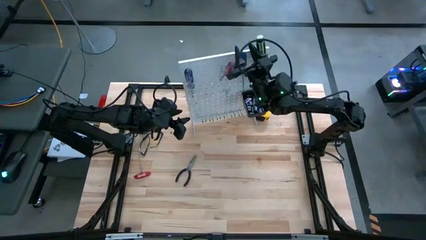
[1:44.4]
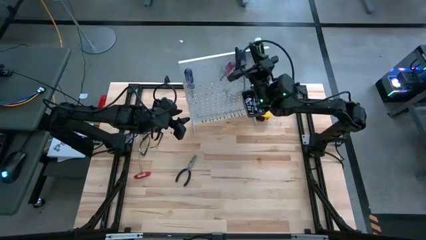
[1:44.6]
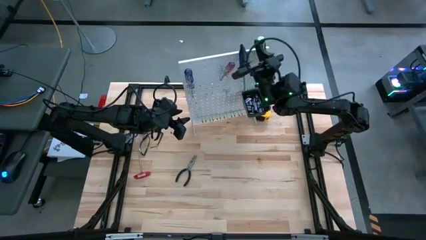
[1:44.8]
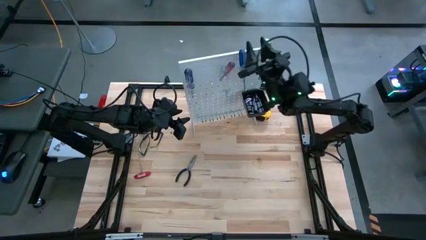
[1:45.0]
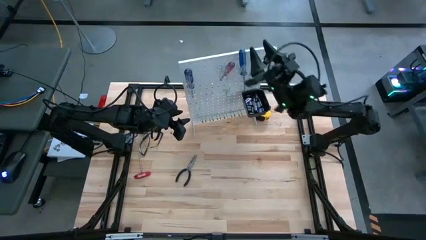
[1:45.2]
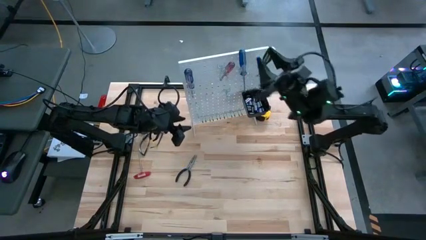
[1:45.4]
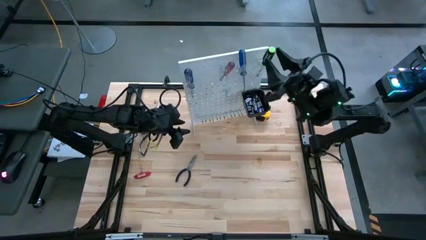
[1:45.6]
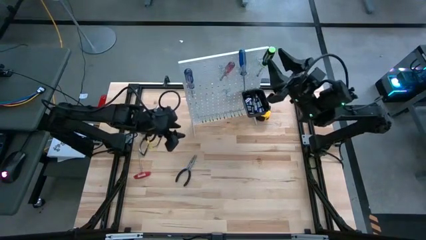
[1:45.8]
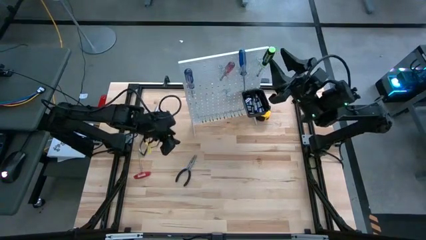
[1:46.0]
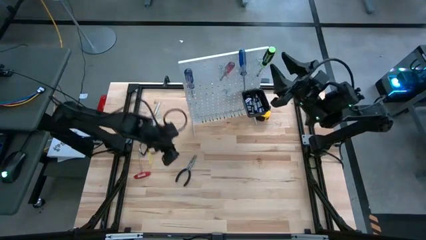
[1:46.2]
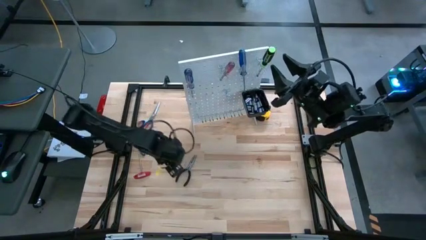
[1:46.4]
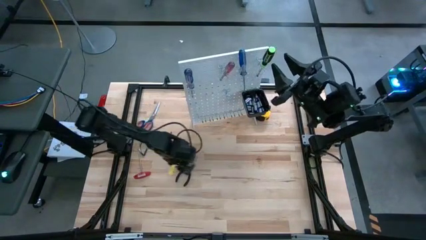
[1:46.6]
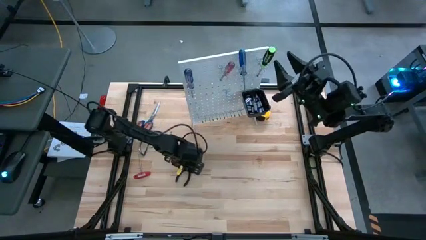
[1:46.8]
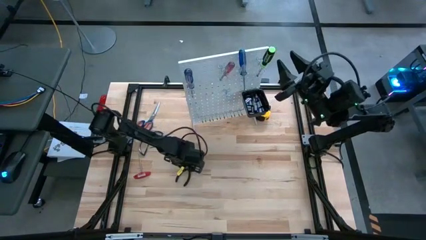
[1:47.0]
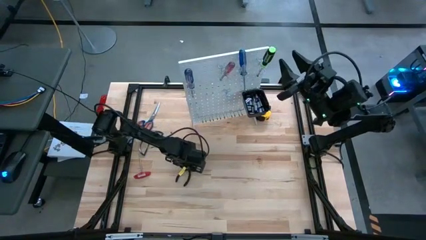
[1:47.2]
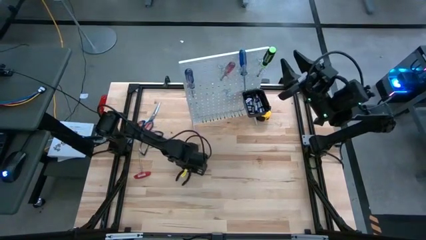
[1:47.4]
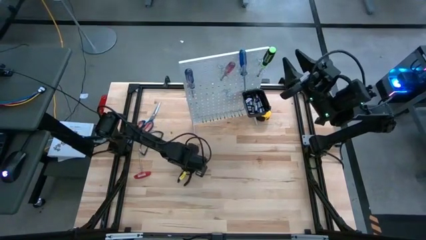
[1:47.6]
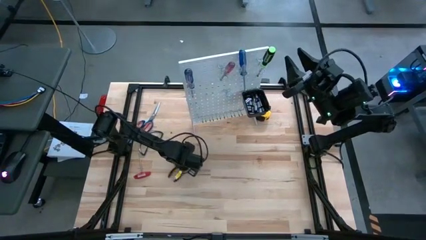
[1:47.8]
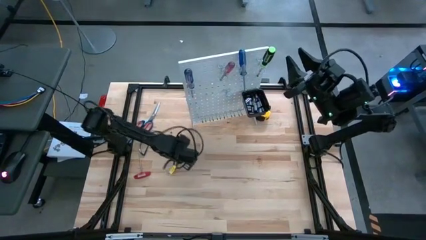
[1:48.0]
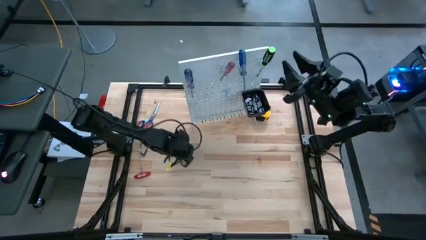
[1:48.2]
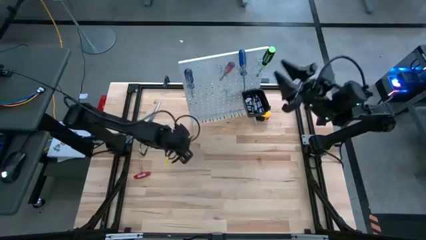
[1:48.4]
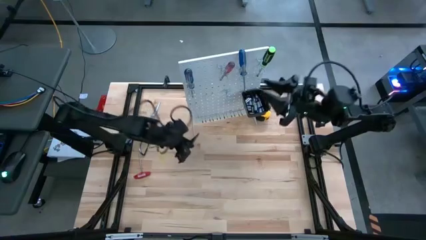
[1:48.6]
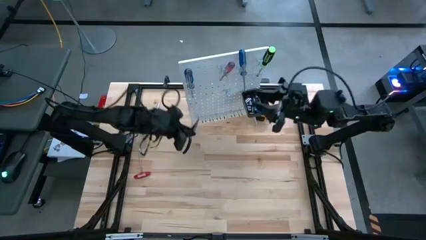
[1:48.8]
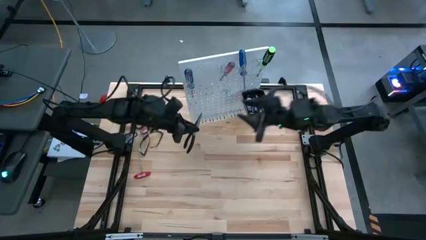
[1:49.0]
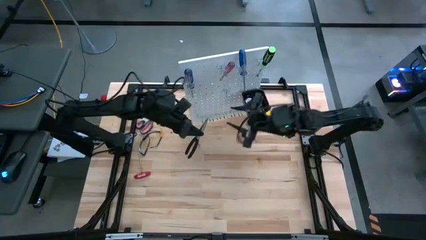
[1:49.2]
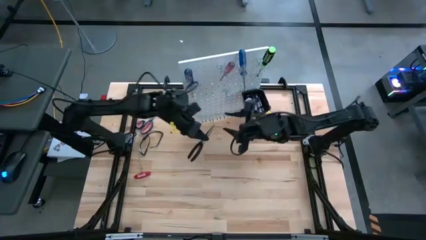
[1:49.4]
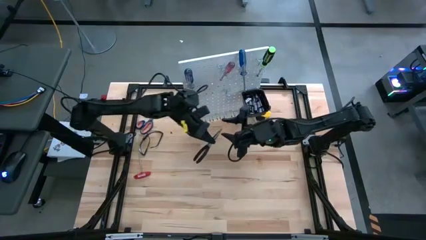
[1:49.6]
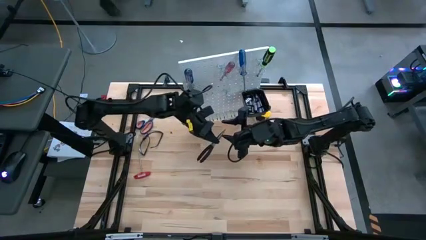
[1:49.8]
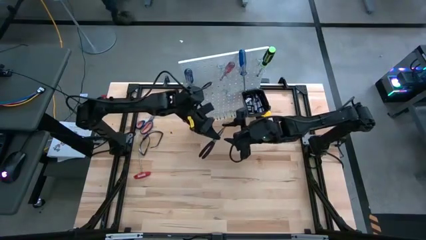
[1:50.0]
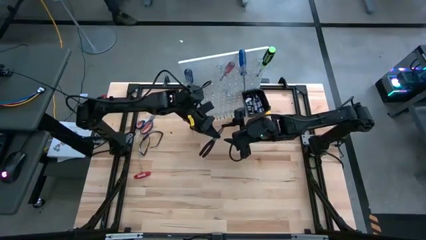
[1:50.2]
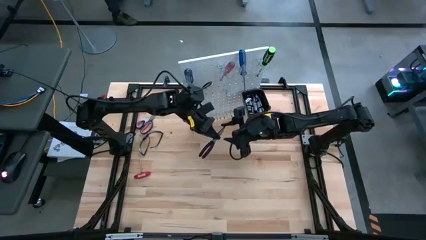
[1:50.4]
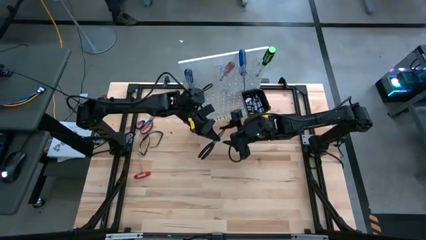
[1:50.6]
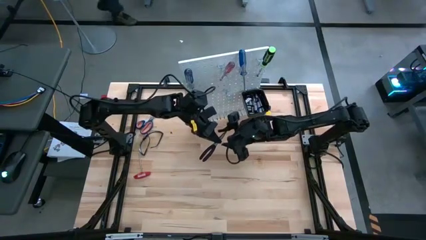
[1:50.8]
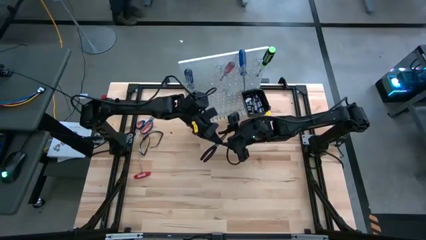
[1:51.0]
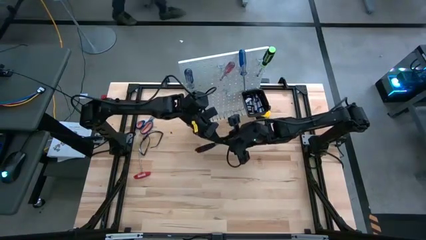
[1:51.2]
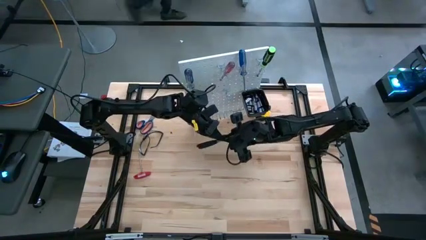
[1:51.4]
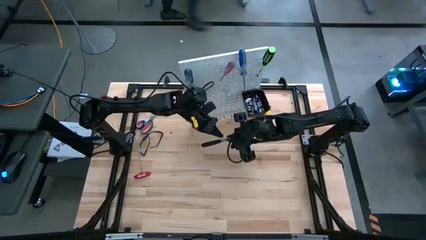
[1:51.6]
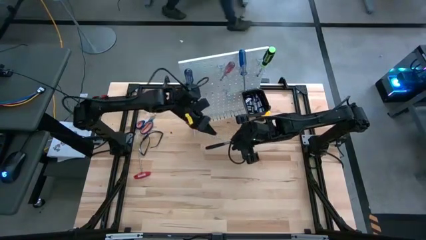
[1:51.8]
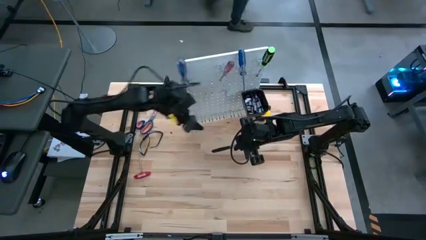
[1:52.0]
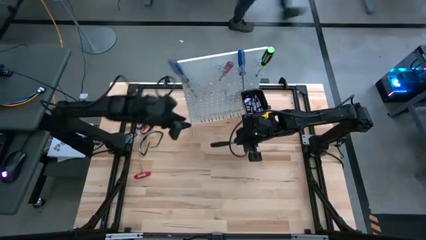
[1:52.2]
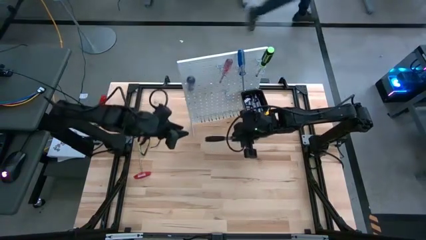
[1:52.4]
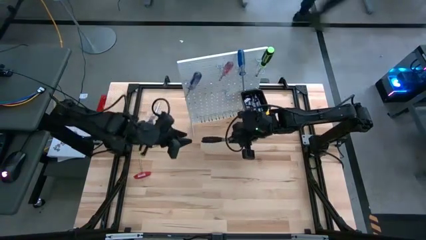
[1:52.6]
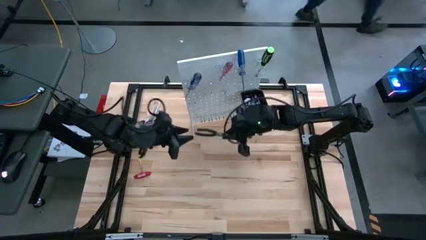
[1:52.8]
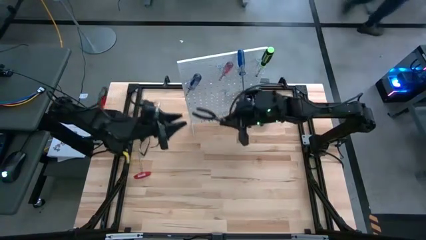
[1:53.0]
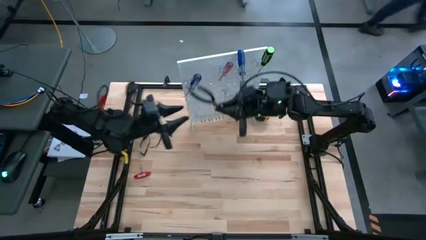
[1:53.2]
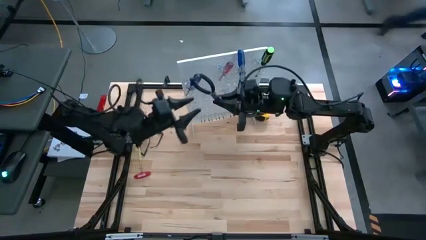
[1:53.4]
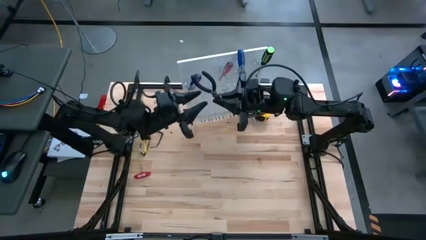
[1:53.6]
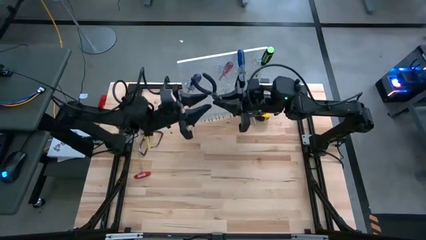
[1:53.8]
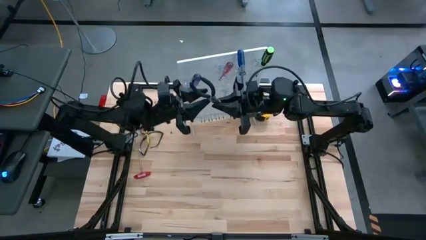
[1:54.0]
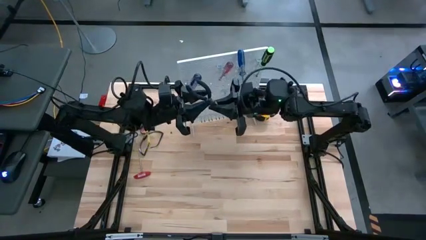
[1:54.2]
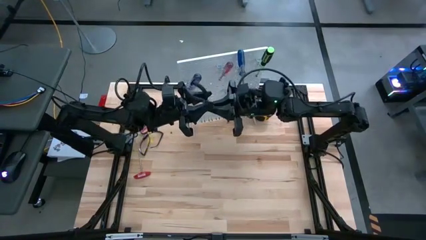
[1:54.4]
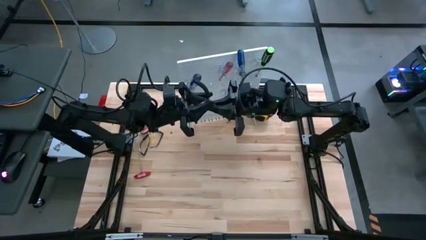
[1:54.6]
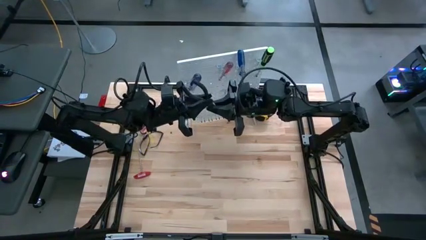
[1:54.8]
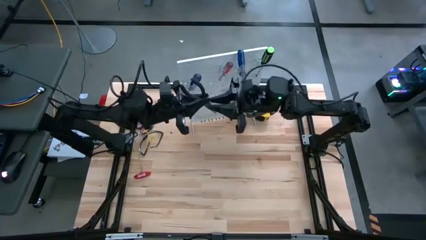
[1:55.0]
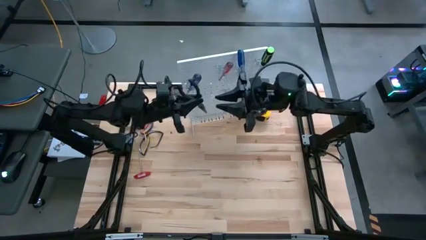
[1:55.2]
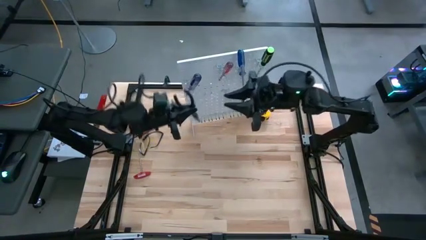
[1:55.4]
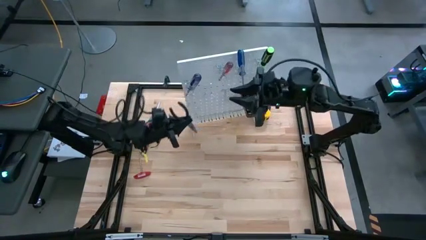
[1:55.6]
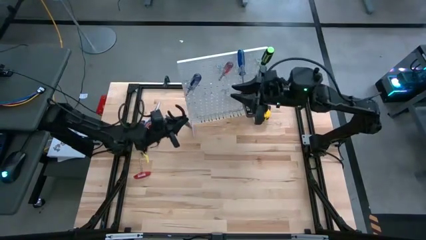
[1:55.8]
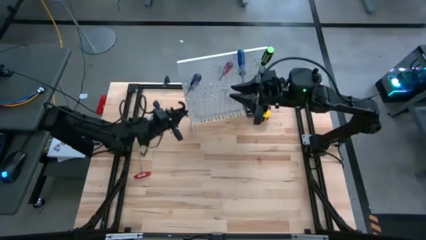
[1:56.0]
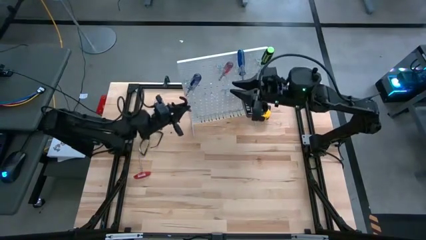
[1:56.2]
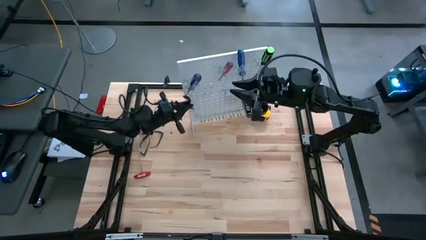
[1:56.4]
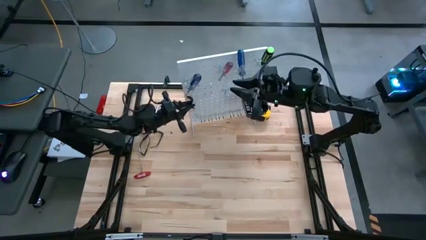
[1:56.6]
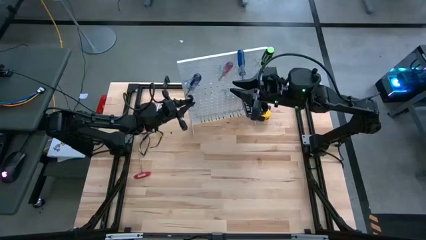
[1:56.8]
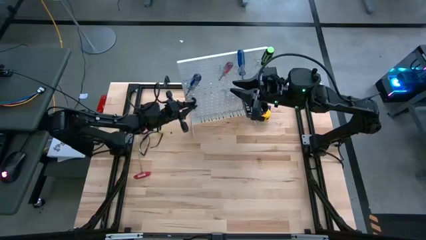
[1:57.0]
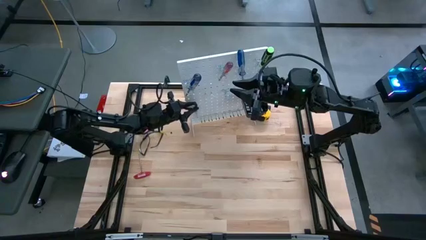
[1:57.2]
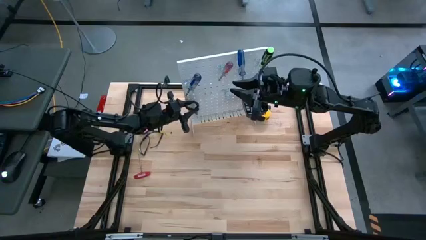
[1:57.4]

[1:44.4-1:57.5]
Task: Hang tools onto peg board
Hang the black pliers on the peg board

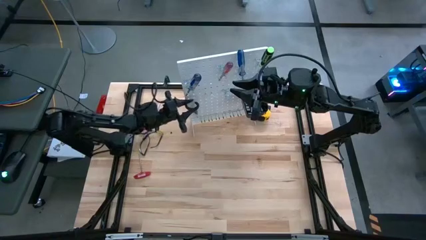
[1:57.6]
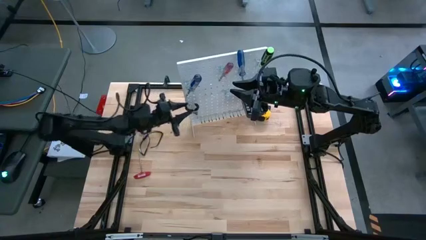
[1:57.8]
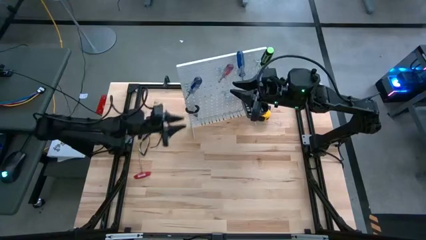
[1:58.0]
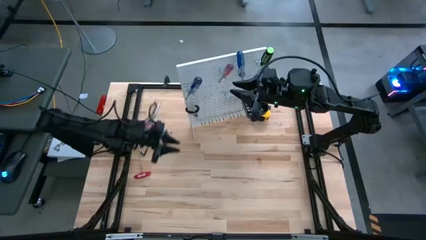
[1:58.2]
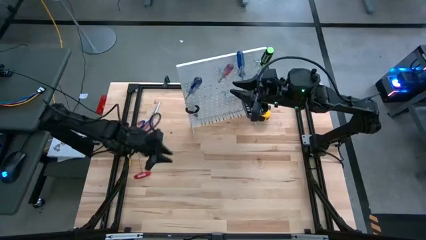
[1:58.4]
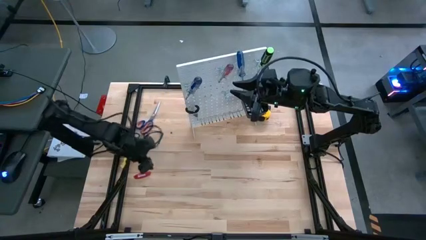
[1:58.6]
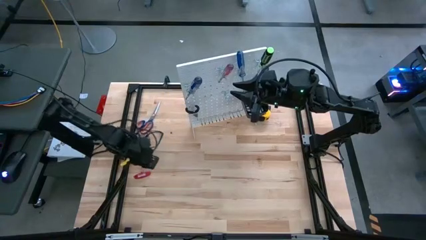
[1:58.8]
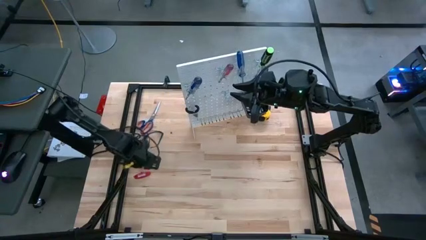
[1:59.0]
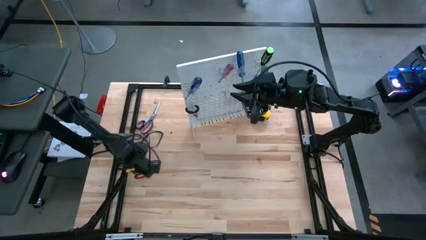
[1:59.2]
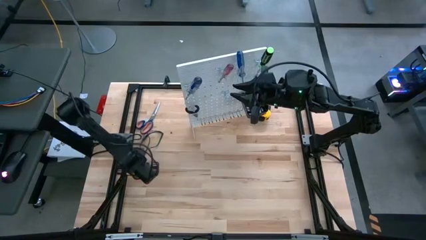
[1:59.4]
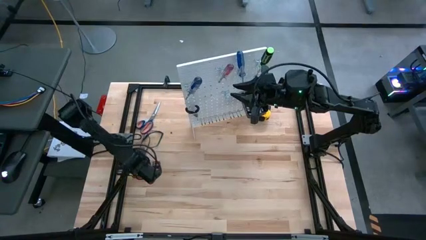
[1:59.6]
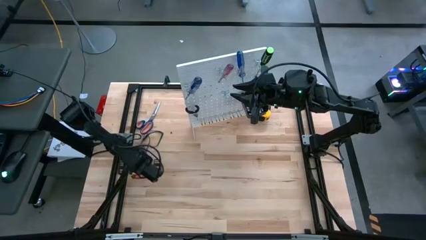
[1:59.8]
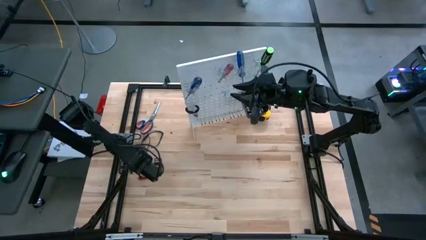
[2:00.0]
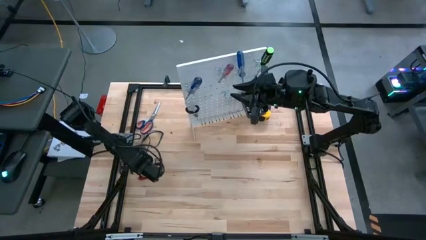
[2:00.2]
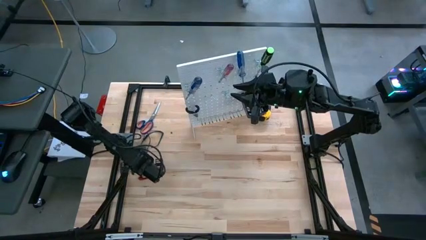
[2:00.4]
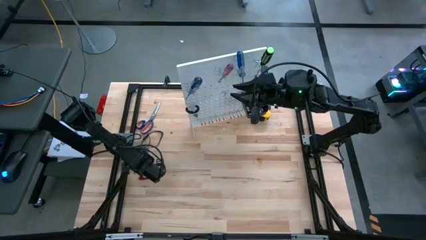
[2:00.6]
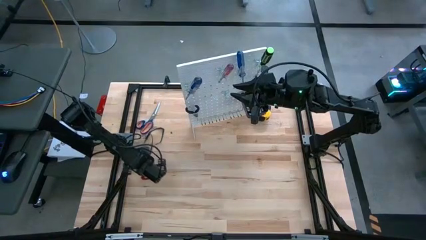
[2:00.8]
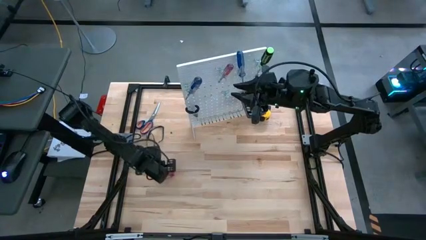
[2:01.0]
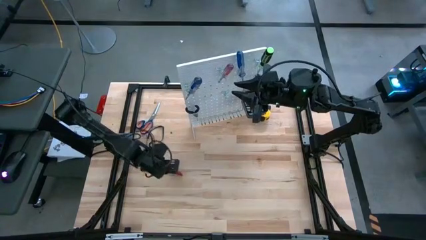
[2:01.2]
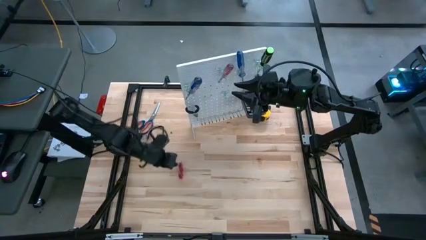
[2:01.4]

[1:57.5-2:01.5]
Hang the red allen wrench on the peg board
